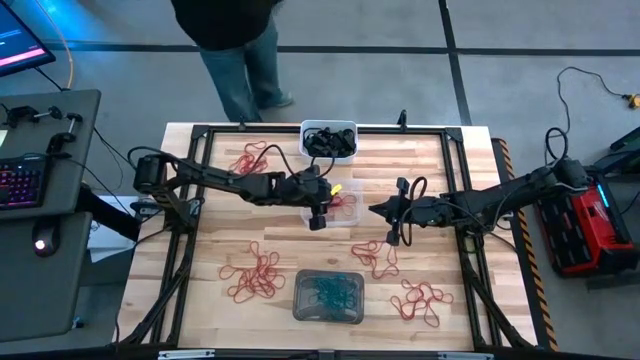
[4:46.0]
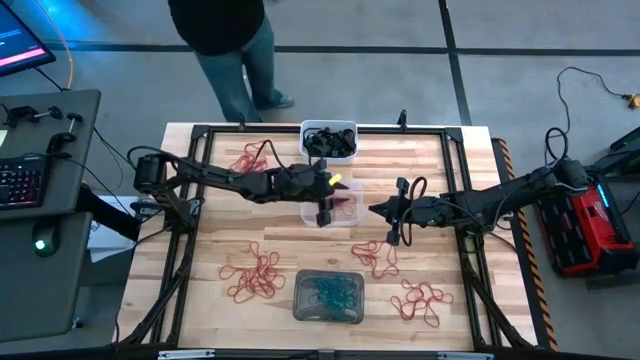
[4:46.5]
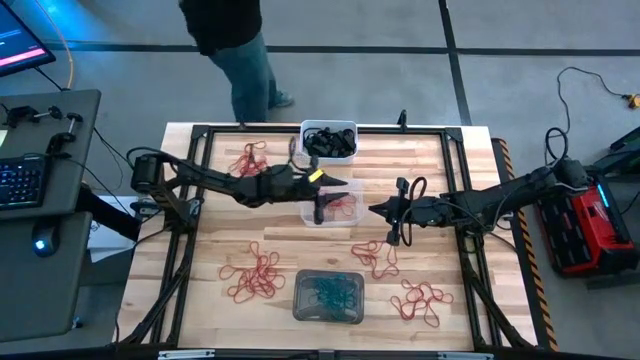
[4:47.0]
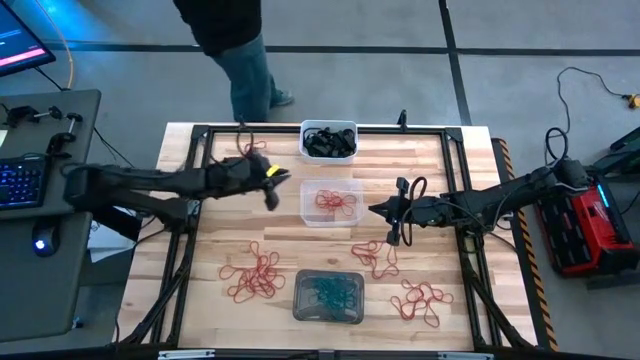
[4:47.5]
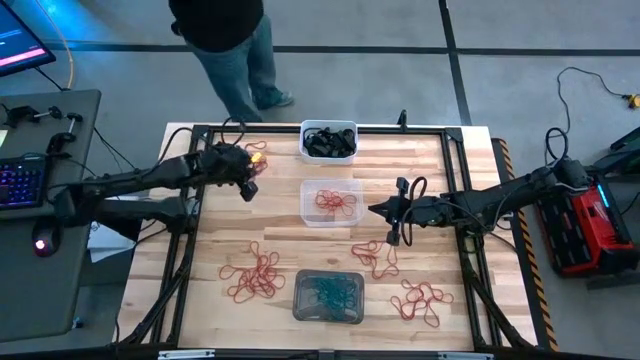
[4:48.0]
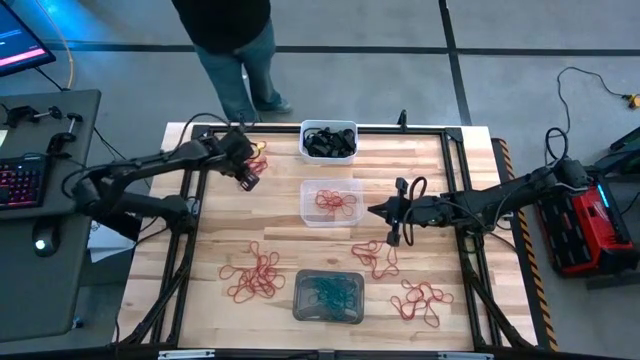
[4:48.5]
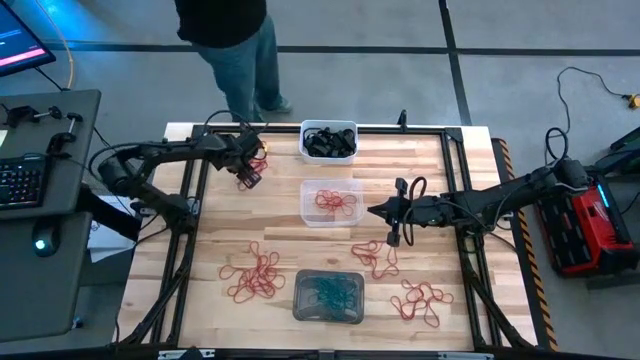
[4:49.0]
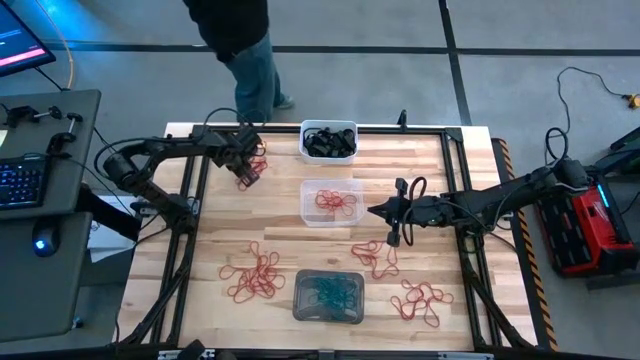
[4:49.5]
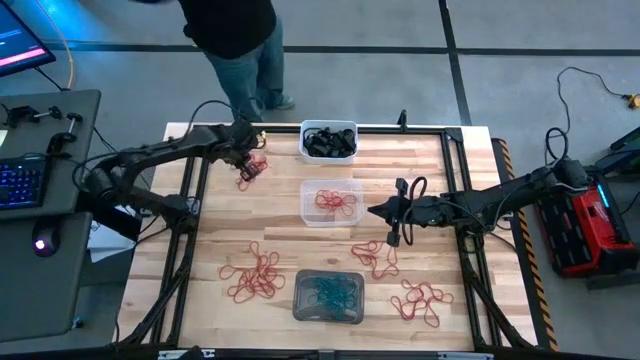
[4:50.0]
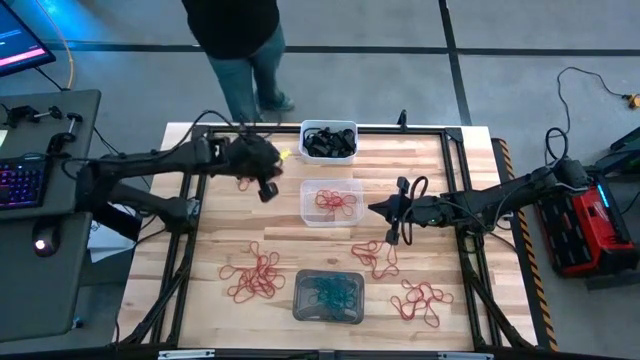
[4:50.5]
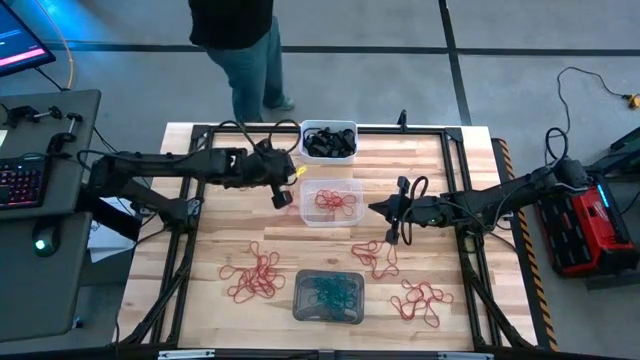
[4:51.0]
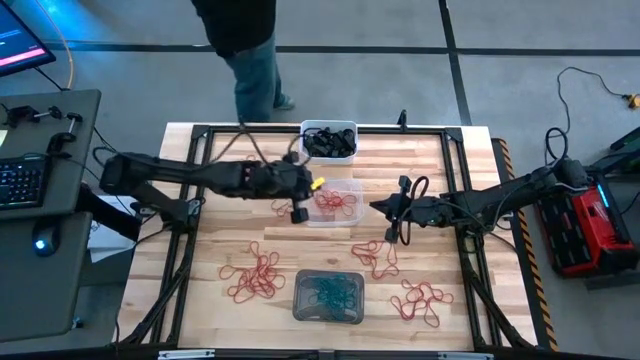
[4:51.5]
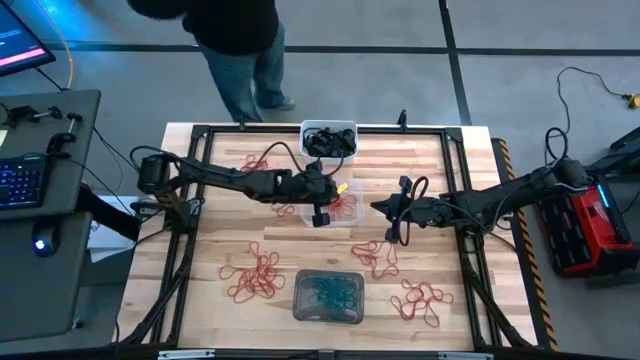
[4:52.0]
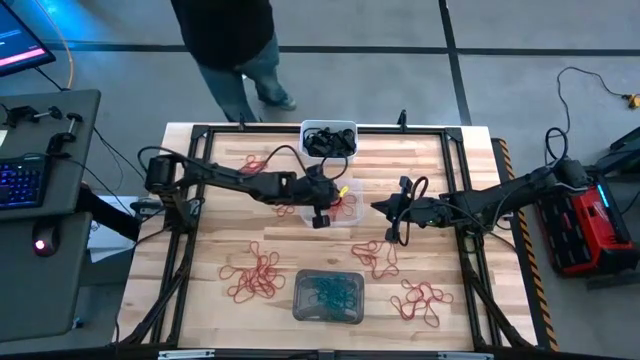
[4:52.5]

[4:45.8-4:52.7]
Task: Sort rubber bands into baskets
Put the red rubber band into the transparent bin

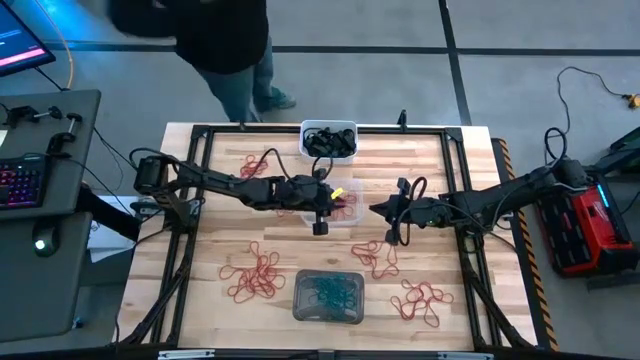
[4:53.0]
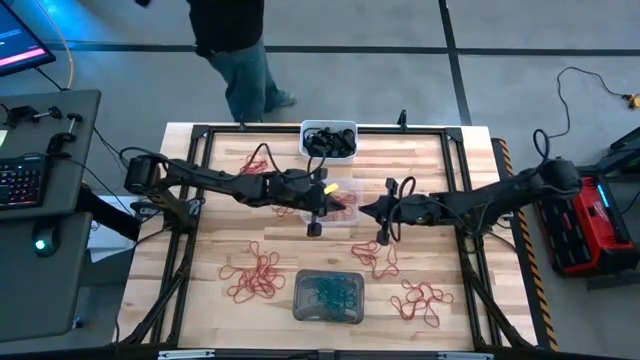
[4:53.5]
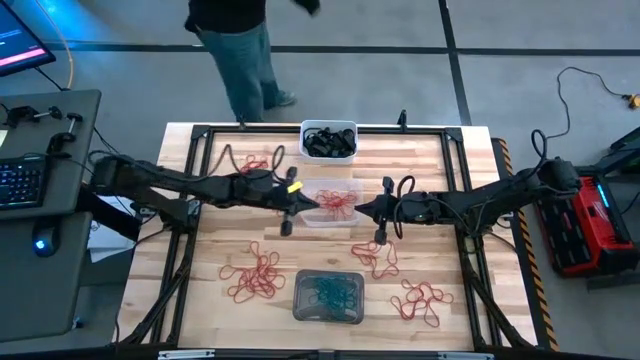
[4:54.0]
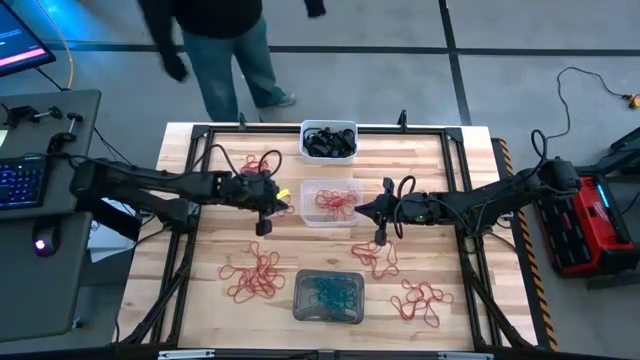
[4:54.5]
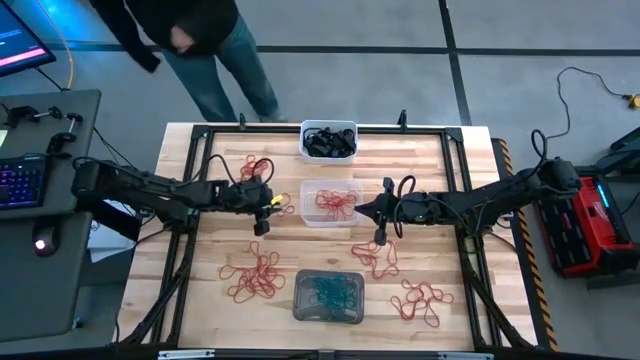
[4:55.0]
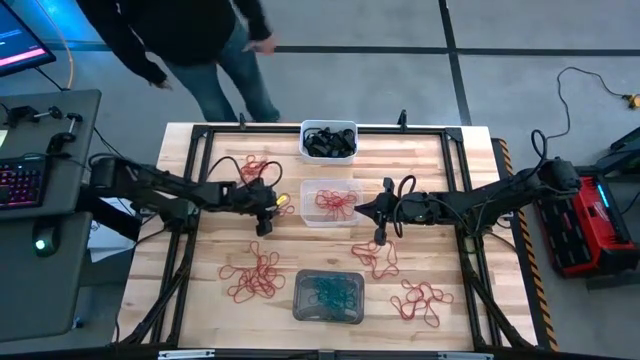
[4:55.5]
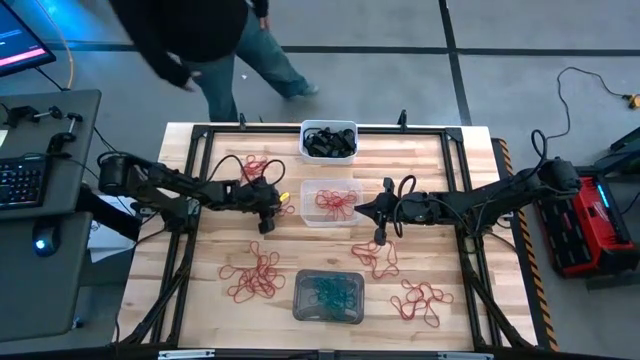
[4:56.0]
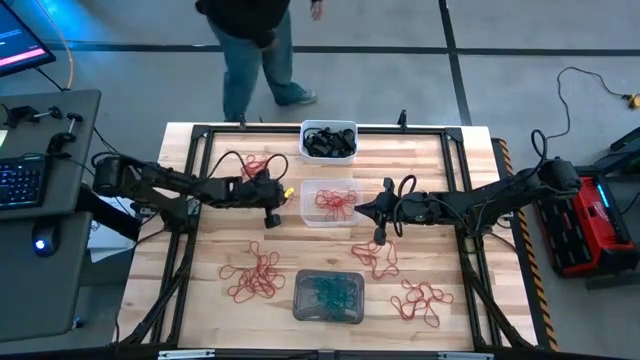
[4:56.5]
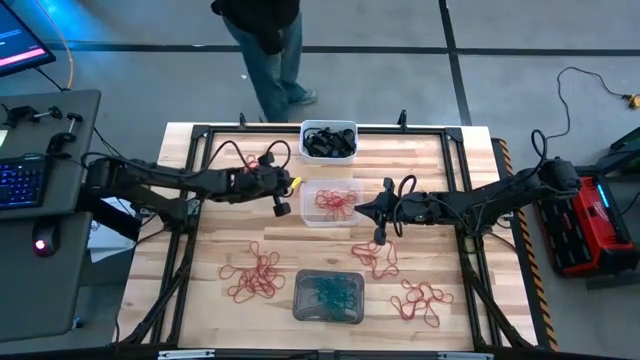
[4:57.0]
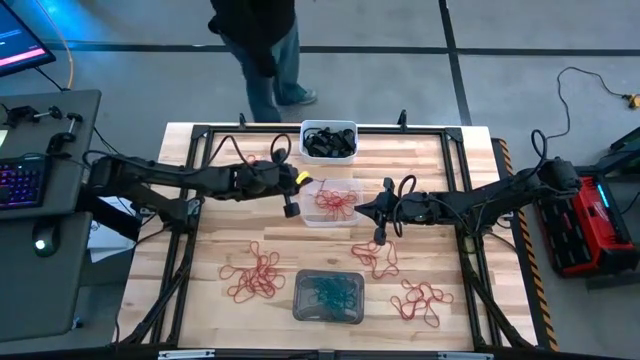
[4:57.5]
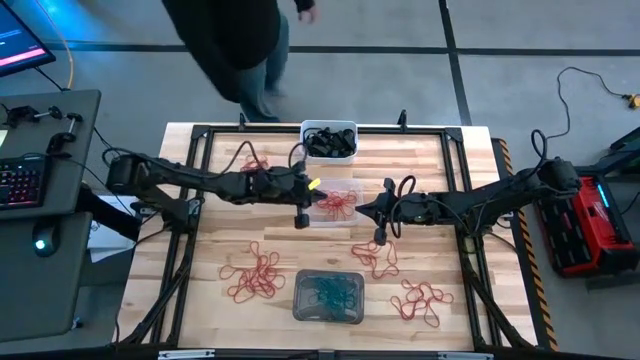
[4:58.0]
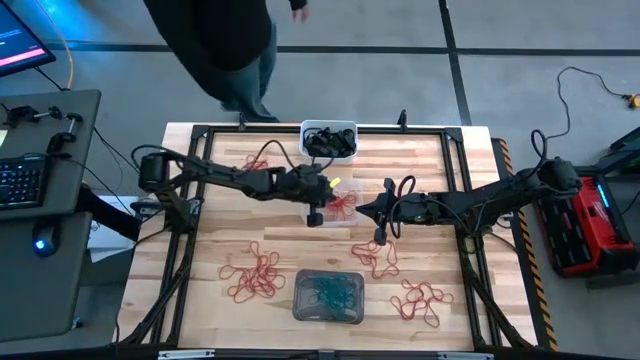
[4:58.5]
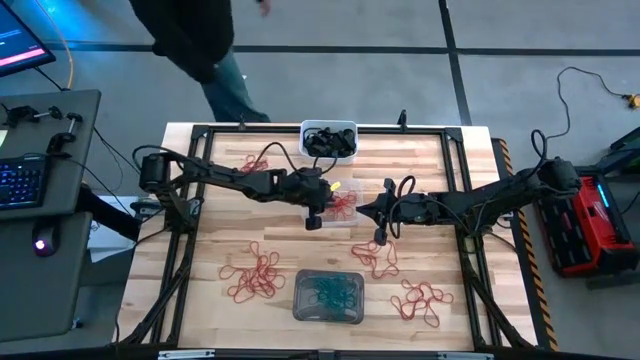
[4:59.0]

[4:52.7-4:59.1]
Put the red rubber band into the transparent bin

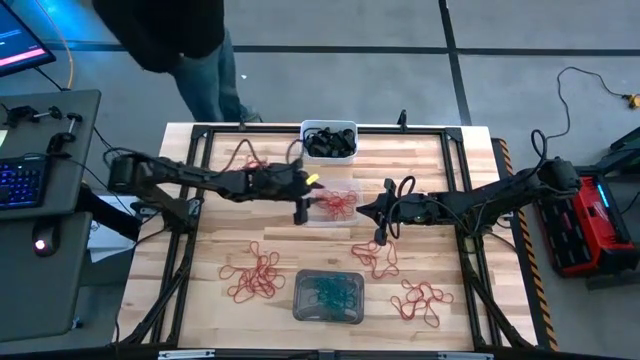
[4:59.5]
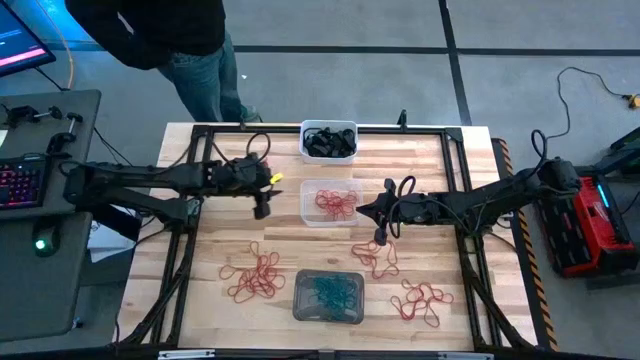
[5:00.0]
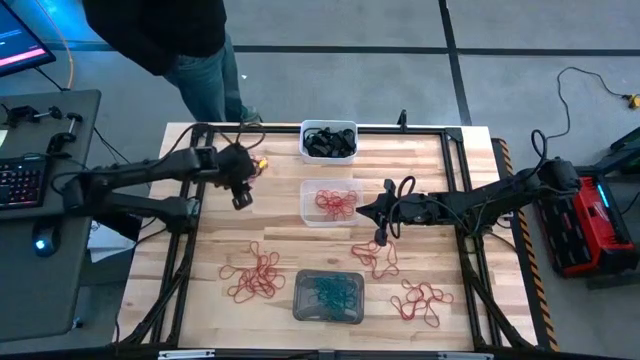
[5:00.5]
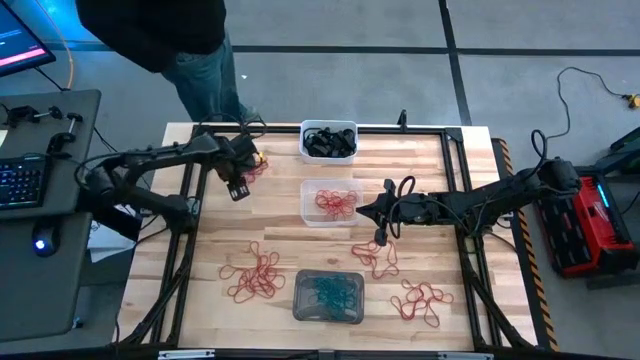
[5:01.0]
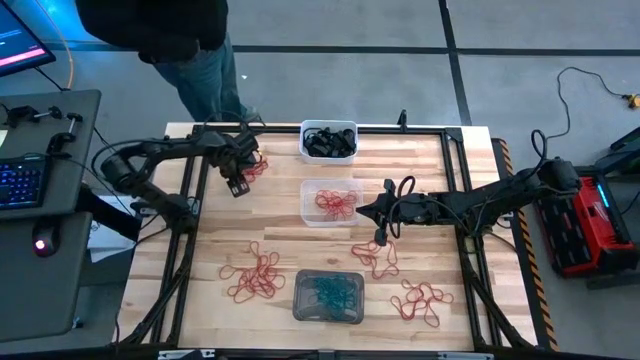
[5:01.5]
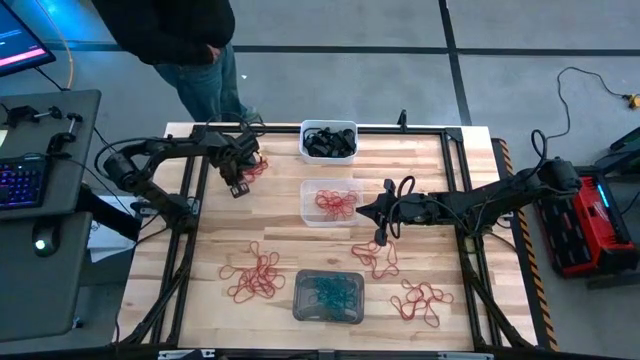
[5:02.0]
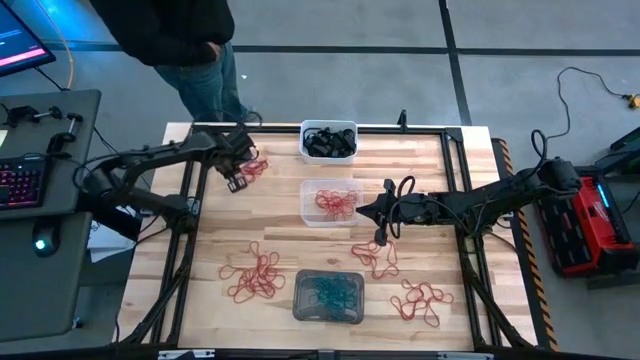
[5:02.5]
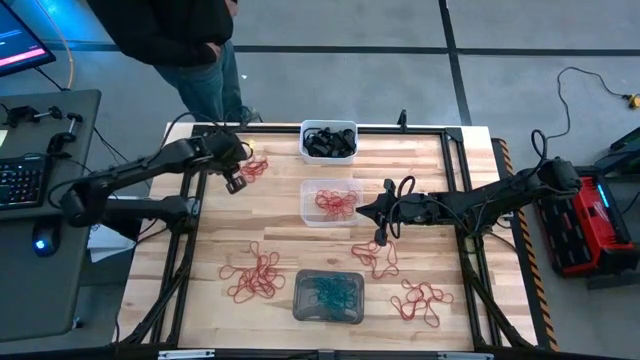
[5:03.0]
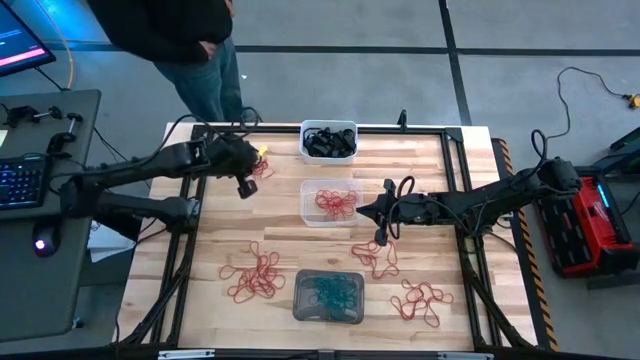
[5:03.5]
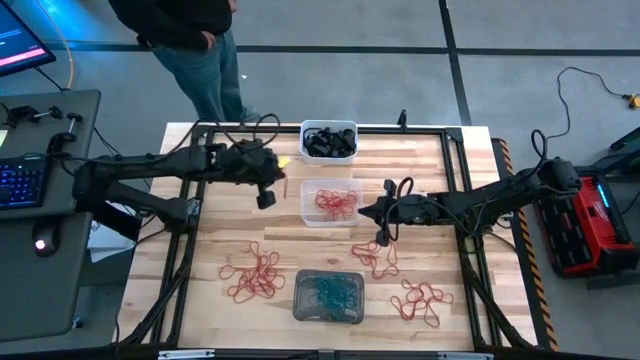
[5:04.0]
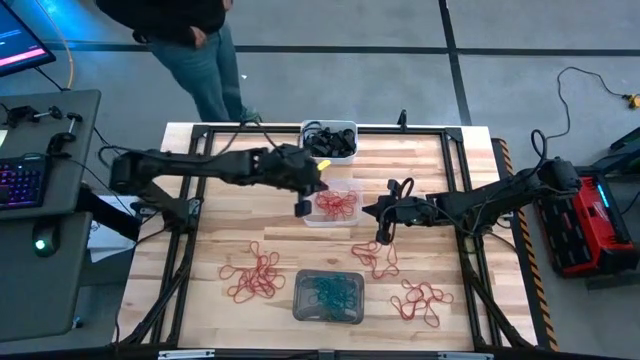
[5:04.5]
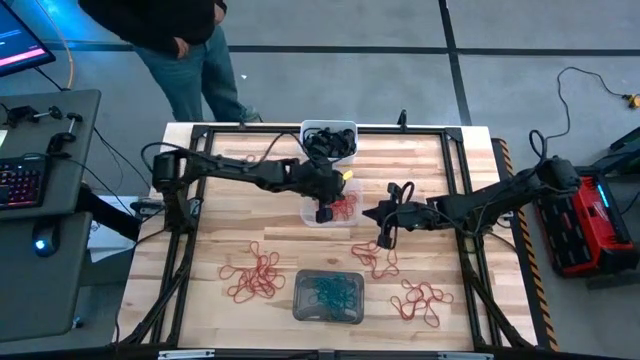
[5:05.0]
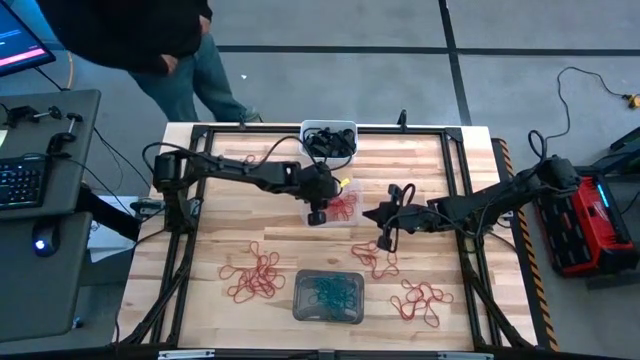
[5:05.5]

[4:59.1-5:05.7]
Put the red rubber band into the transparent bin
